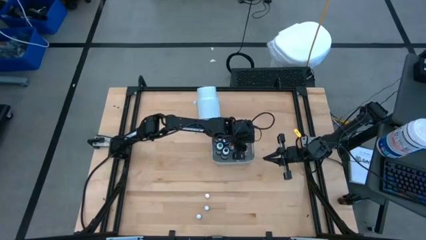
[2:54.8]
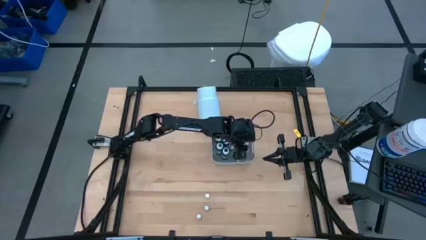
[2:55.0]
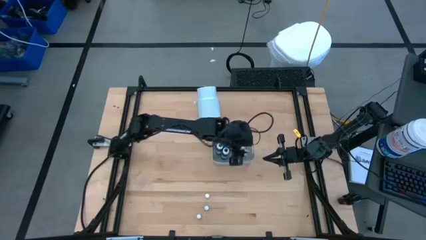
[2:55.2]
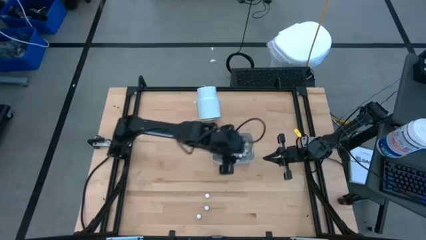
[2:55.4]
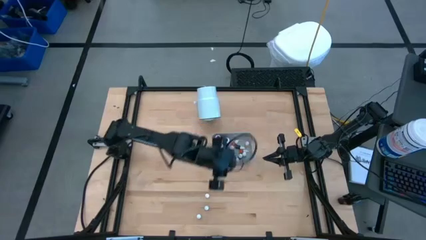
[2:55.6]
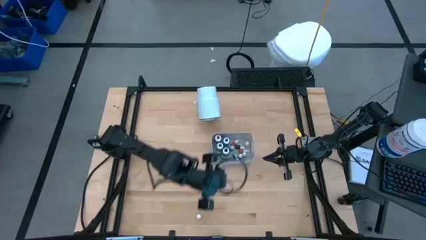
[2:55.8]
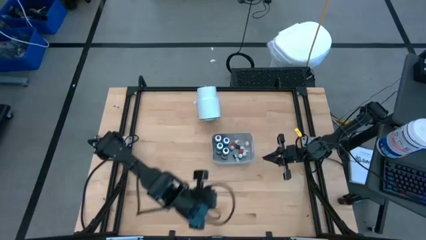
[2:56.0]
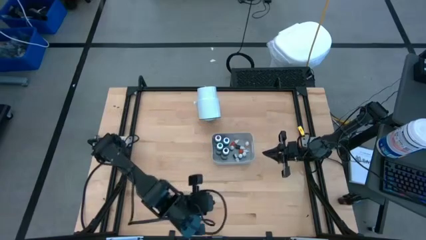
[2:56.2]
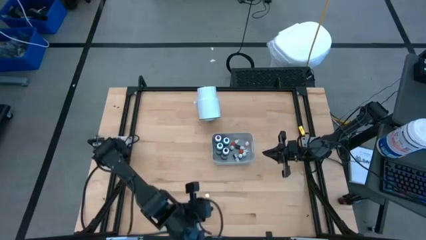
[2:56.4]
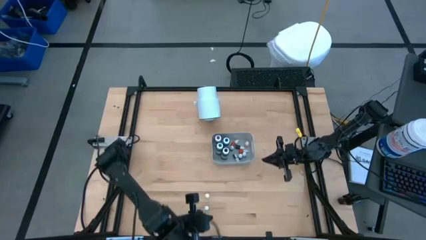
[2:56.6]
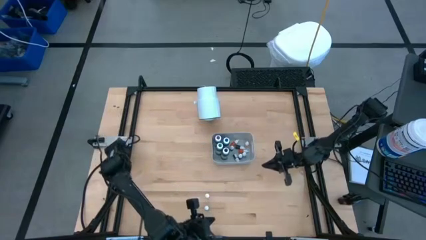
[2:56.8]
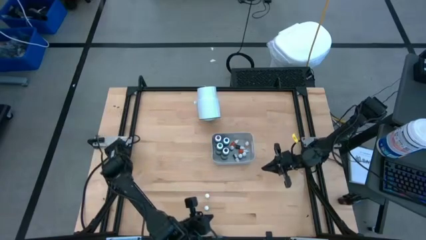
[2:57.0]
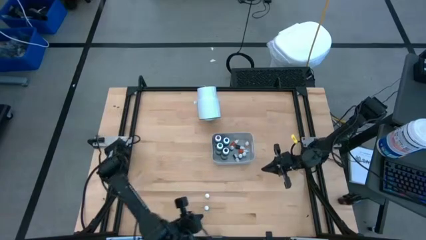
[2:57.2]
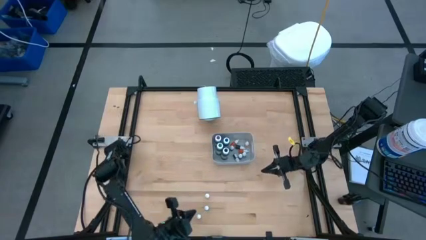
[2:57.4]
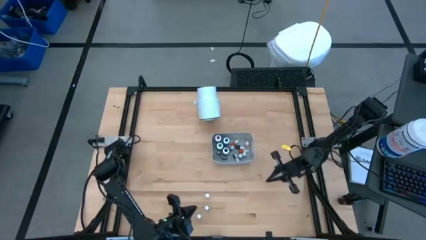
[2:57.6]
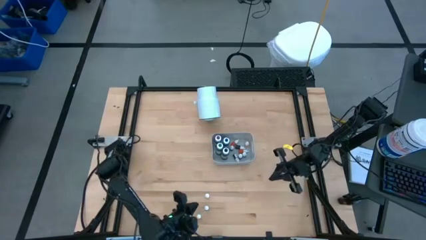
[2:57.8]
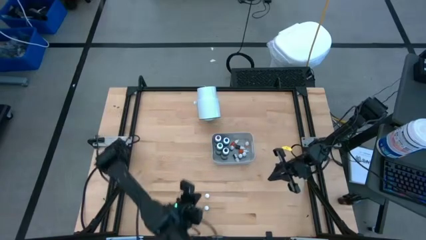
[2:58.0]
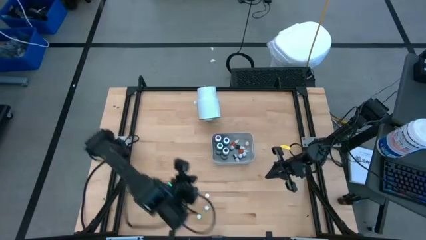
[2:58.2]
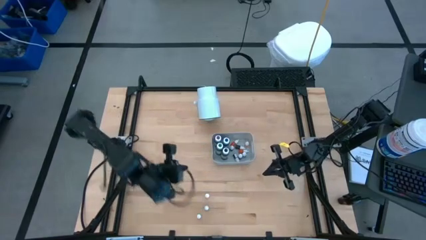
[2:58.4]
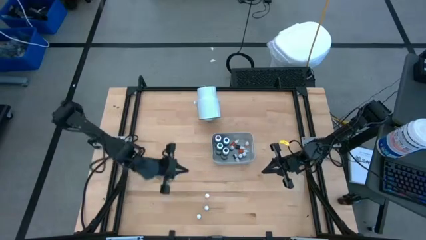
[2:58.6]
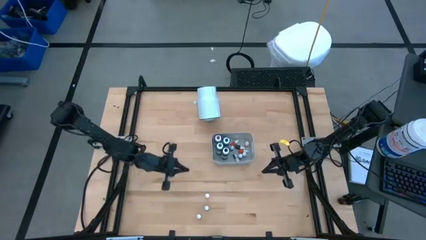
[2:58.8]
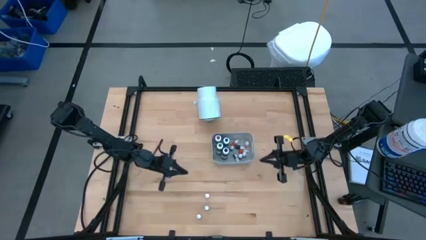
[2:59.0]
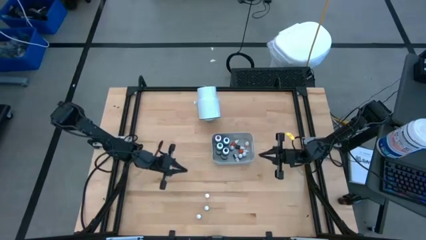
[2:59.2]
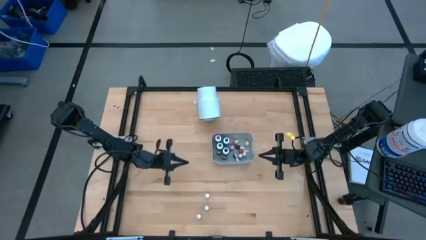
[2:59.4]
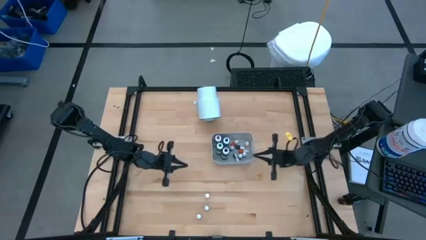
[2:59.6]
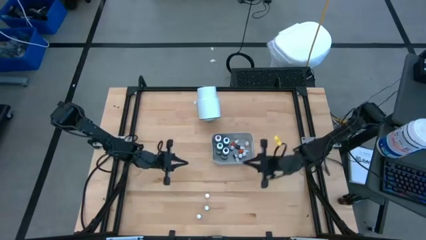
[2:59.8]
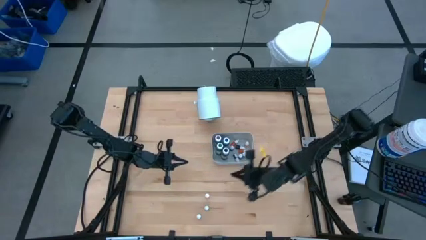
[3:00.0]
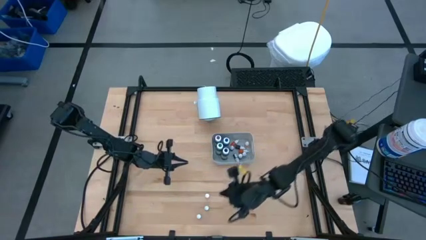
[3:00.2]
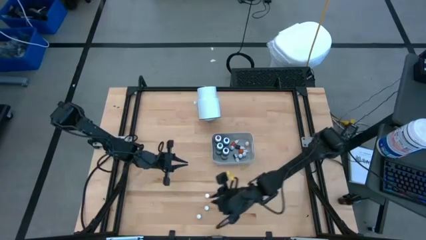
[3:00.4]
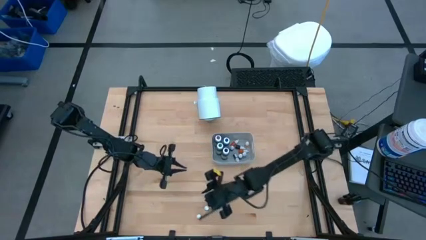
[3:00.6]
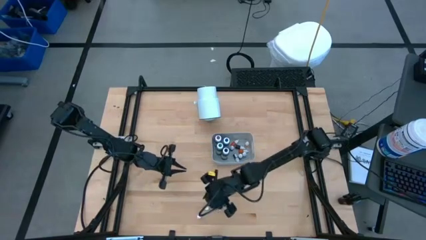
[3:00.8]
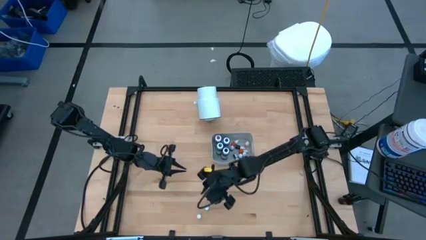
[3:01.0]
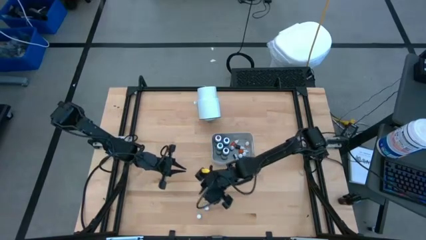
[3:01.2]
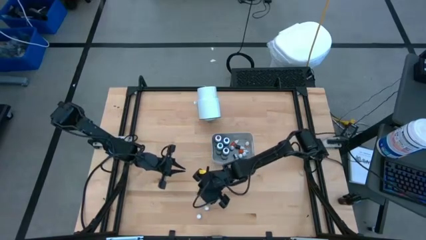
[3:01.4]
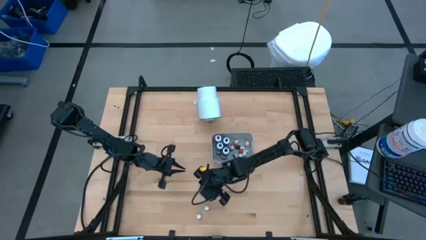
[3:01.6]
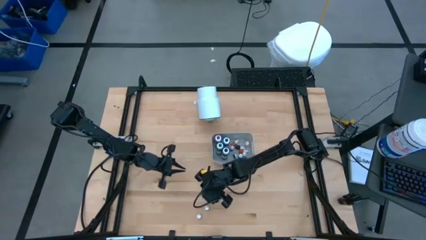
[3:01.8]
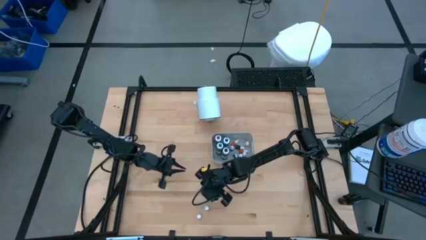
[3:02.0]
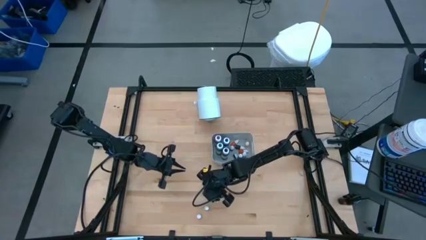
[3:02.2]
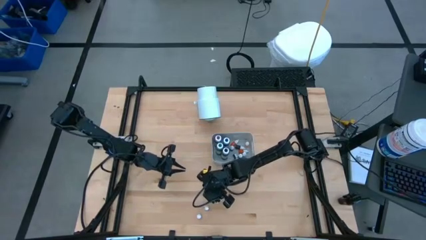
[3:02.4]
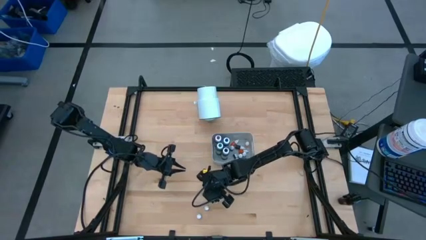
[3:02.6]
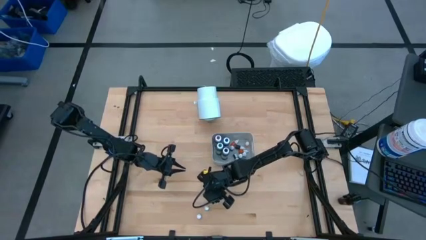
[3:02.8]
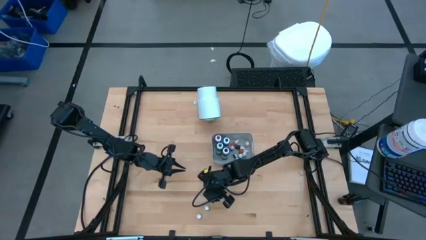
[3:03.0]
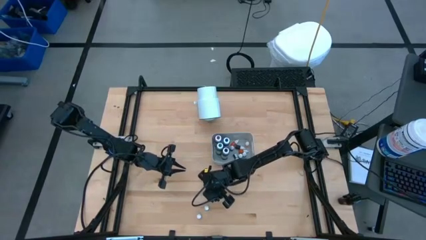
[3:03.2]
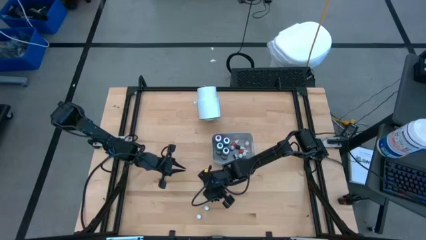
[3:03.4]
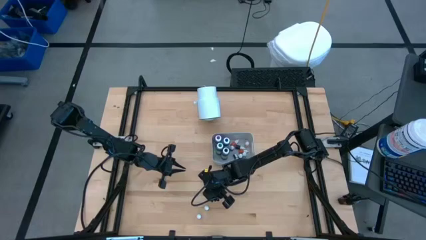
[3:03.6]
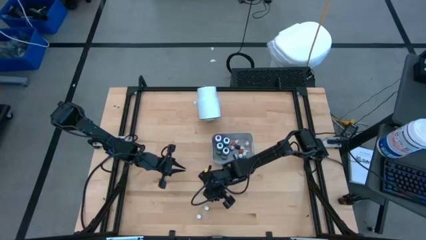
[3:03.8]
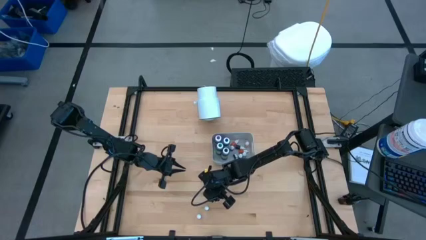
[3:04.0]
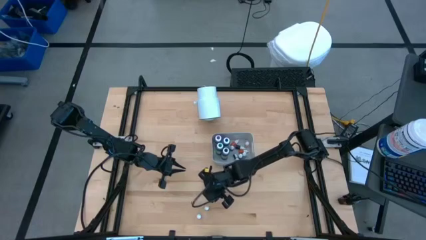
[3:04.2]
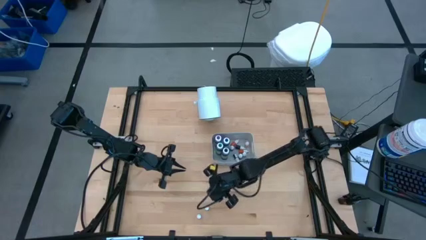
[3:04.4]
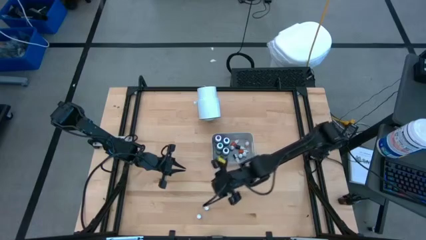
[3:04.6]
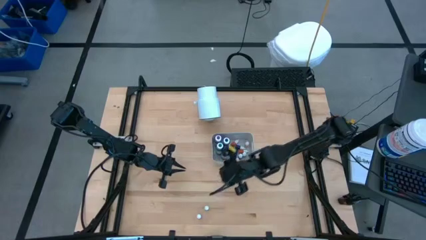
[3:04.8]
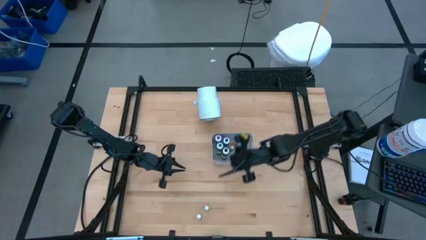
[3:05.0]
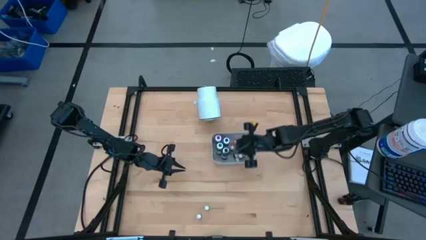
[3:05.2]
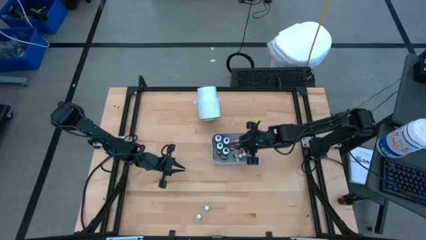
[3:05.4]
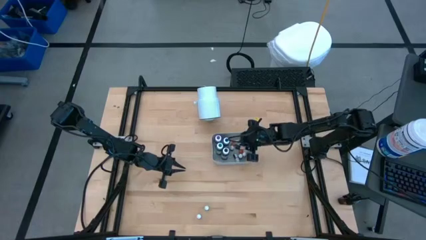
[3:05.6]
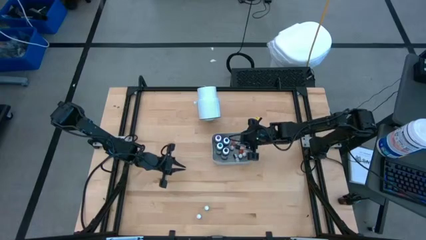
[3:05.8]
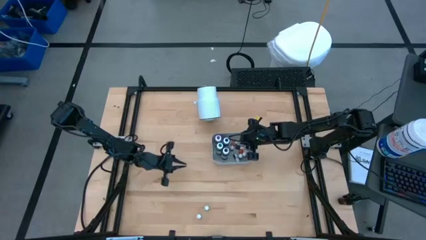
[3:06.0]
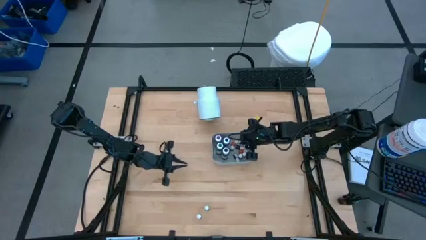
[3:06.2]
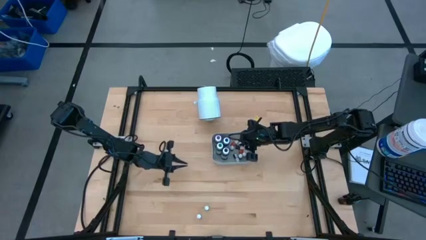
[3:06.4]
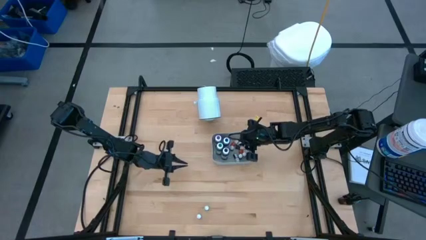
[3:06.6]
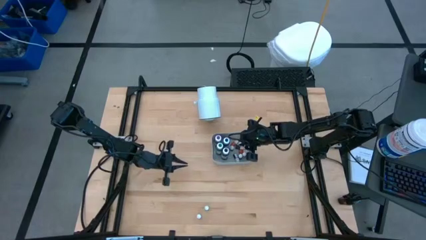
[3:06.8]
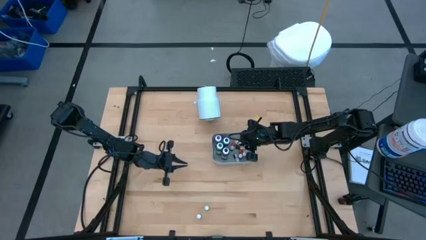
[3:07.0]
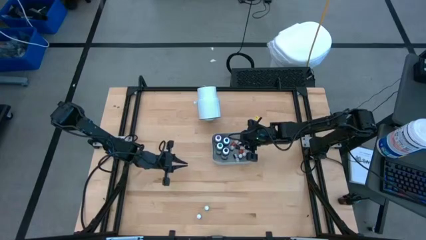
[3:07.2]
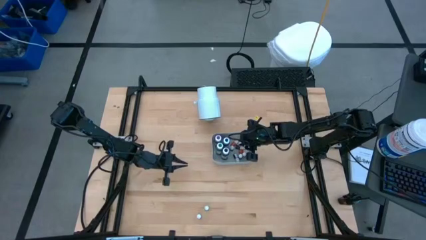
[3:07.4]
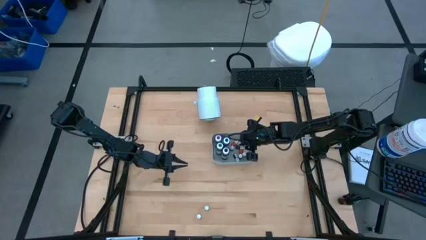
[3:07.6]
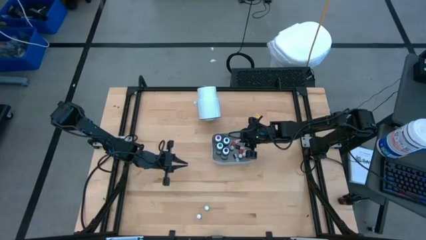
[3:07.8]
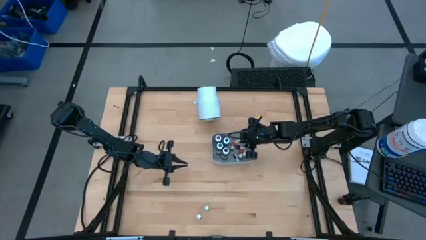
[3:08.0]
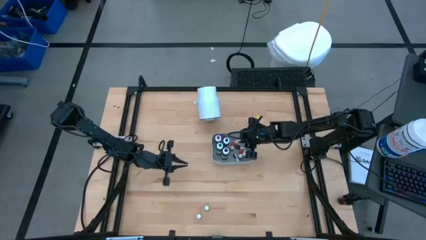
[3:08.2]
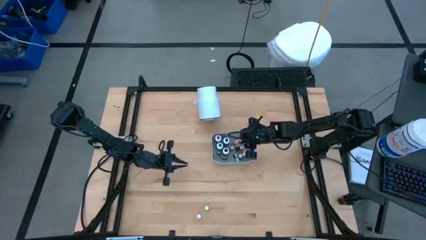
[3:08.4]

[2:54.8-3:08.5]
Task: Pick & Place food coloring
Put the orange food coloring bottle into the gray bin

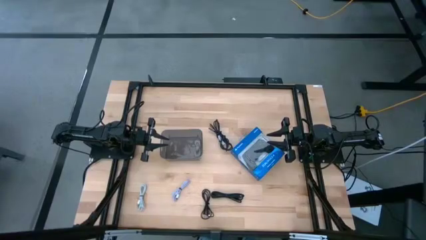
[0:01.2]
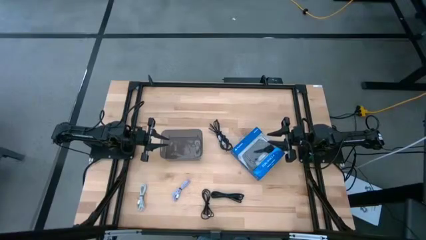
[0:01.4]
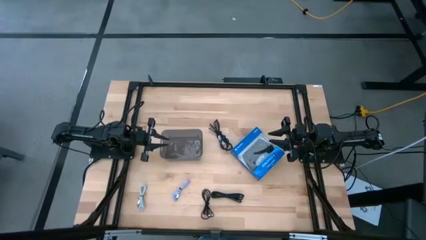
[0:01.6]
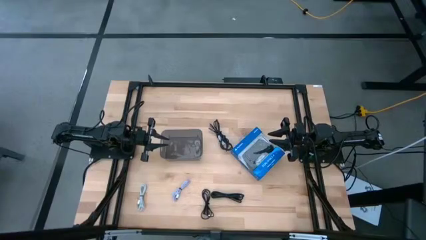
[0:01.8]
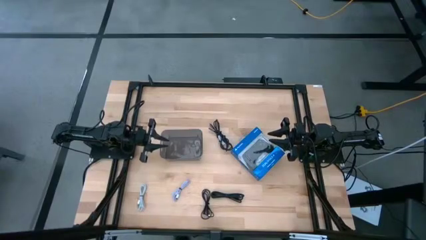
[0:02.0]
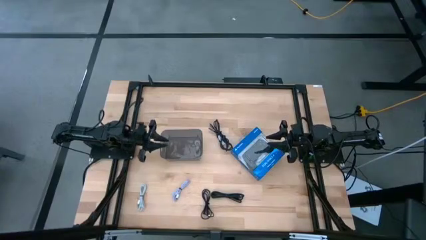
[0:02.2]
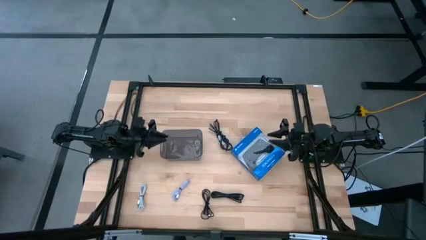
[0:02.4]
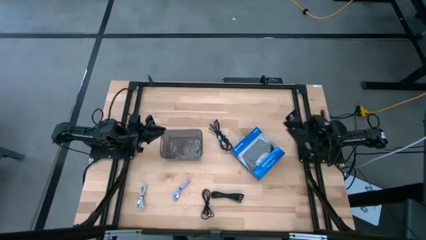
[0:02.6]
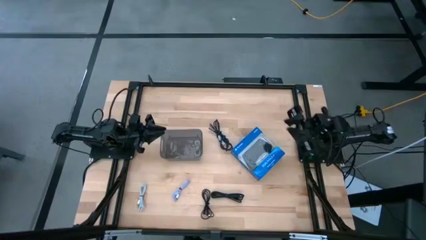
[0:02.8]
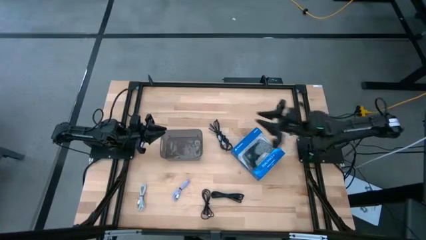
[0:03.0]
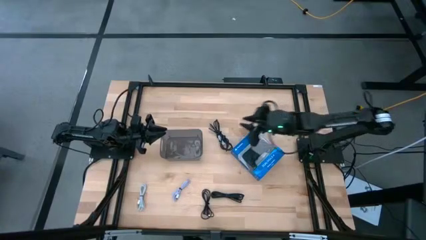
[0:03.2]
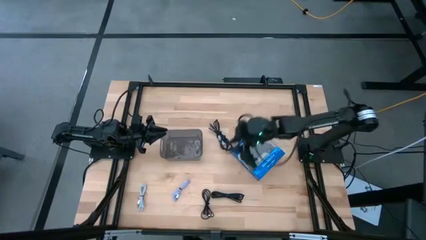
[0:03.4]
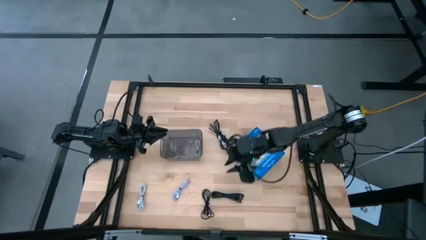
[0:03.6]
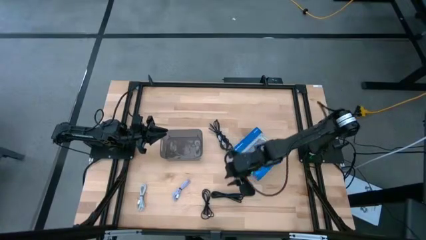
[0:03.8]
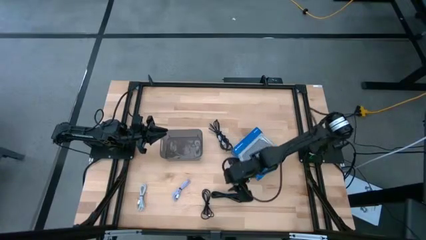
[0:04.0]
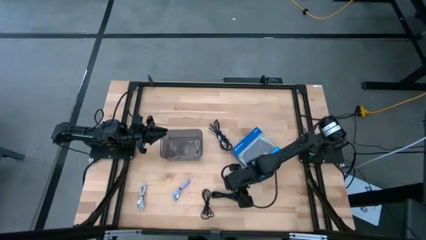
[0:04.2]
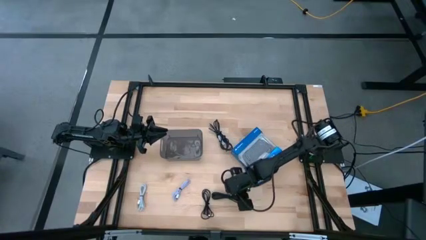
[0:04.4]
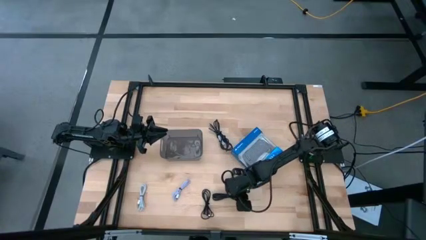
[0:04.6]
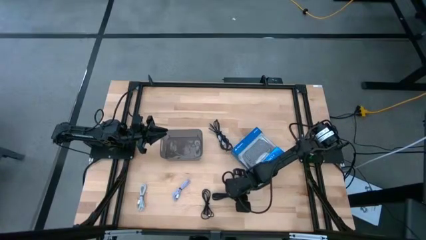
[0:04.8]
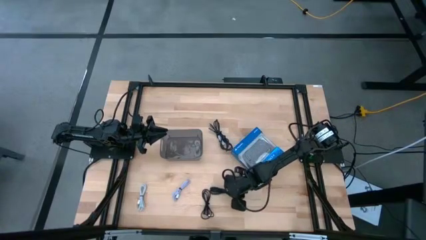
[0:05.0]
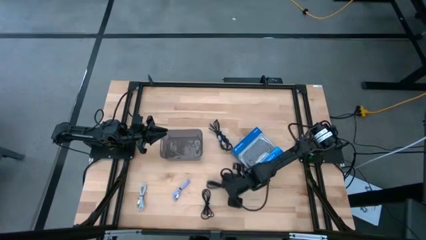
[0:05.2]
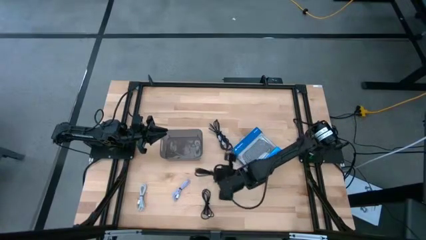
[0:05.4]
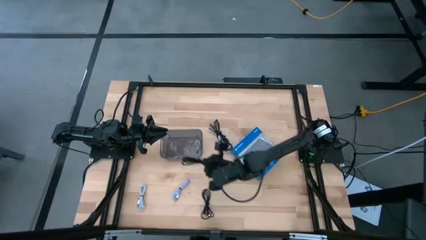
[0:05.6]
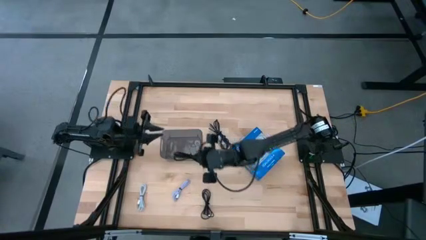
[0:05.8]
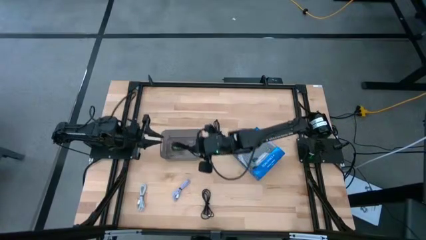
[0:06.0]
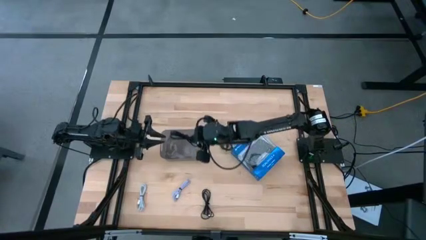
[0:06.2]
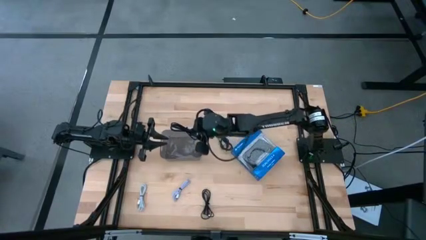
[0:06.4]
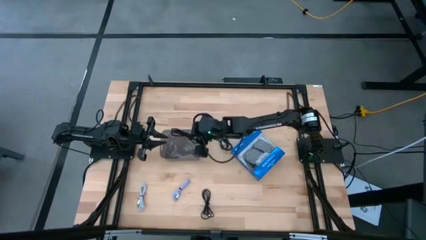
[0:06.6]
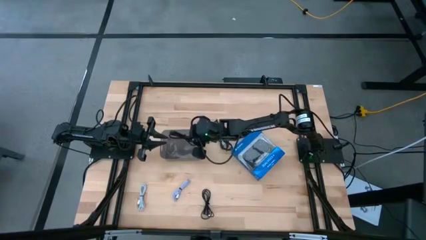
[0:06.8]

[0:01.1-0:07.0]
Task: Pick and place USB-C Cables
Put the bottom right black charger cable into the black bin
